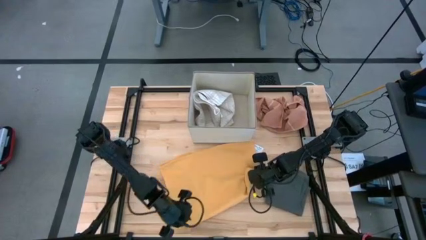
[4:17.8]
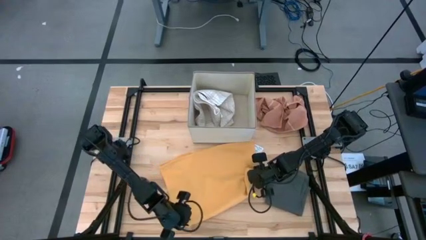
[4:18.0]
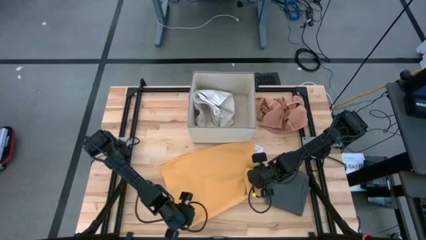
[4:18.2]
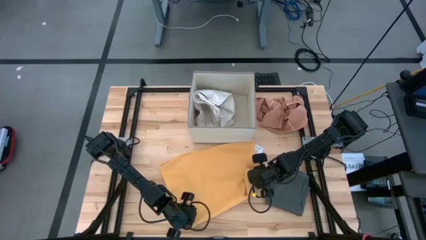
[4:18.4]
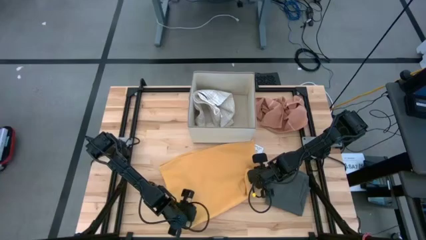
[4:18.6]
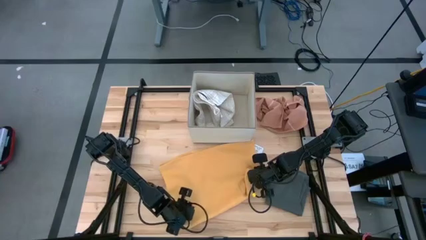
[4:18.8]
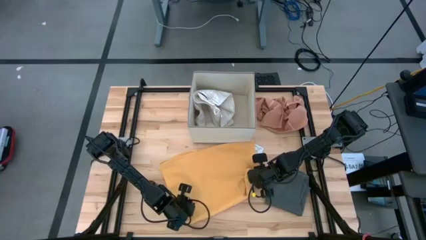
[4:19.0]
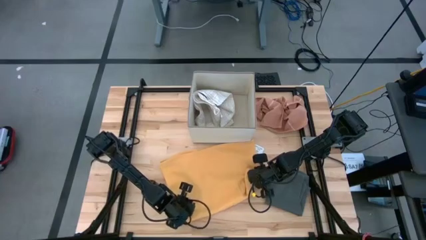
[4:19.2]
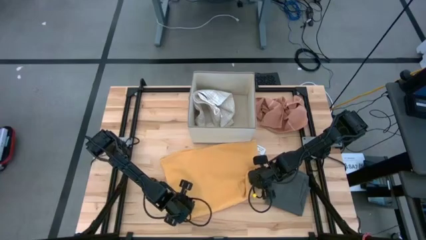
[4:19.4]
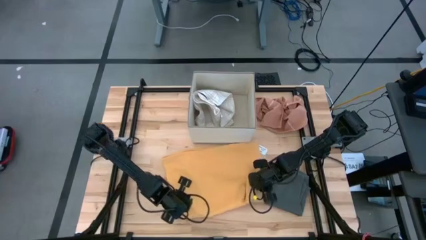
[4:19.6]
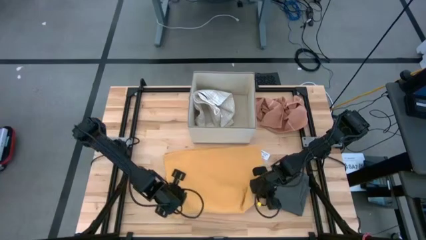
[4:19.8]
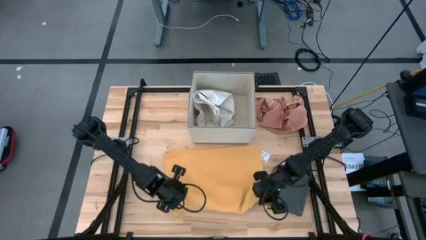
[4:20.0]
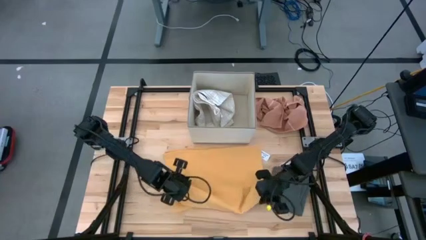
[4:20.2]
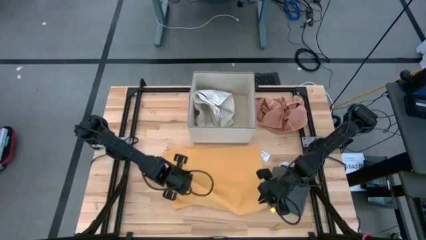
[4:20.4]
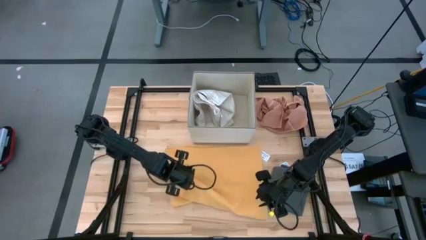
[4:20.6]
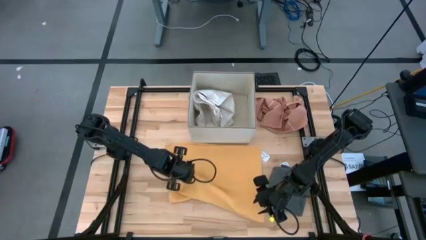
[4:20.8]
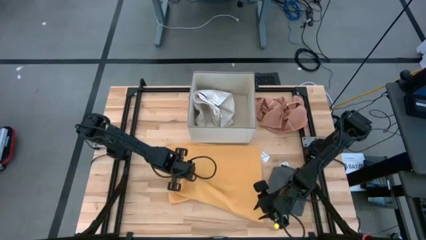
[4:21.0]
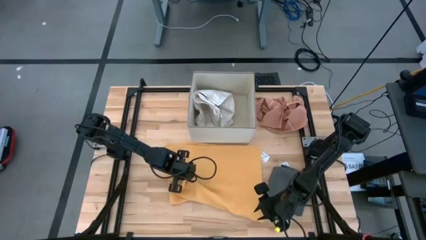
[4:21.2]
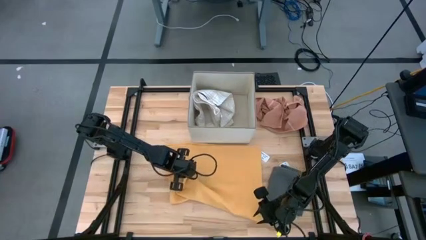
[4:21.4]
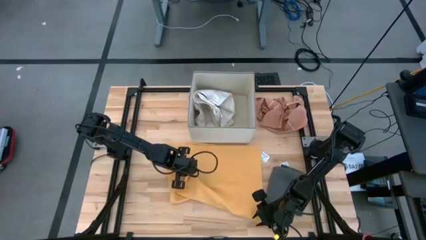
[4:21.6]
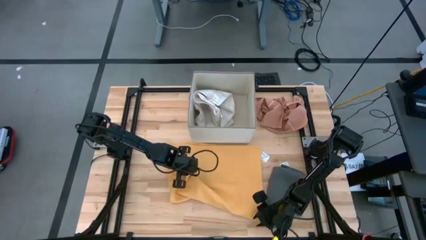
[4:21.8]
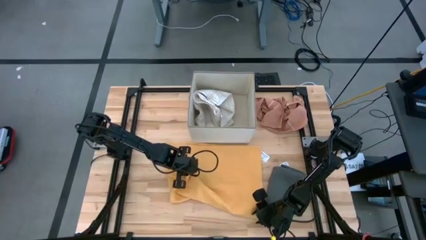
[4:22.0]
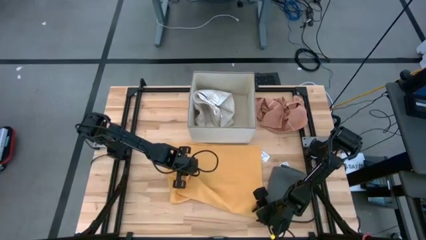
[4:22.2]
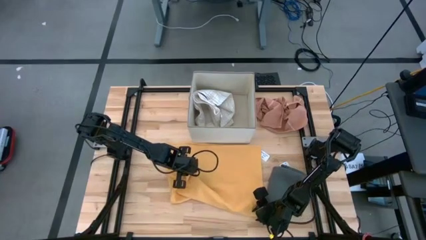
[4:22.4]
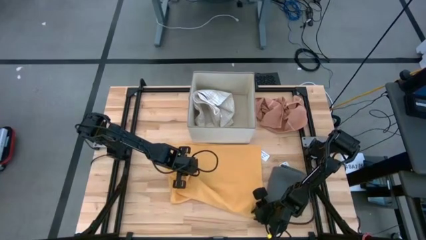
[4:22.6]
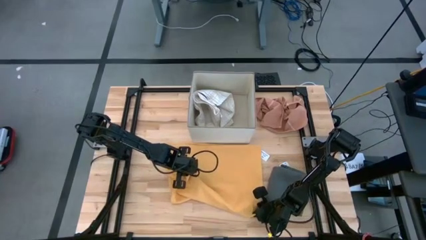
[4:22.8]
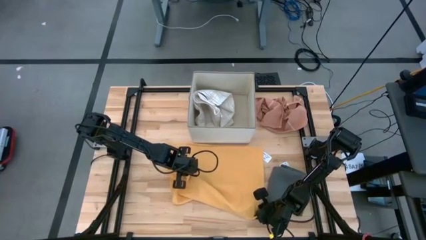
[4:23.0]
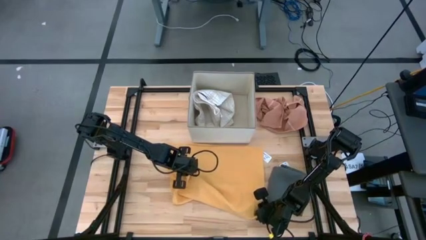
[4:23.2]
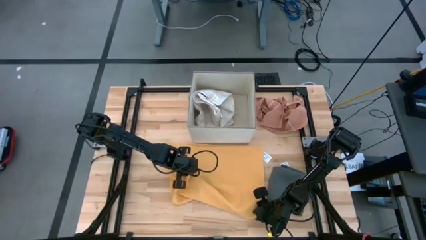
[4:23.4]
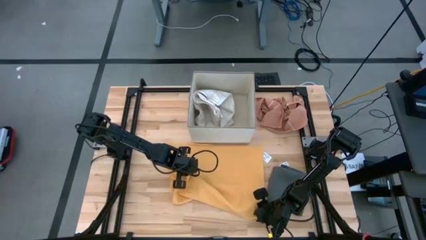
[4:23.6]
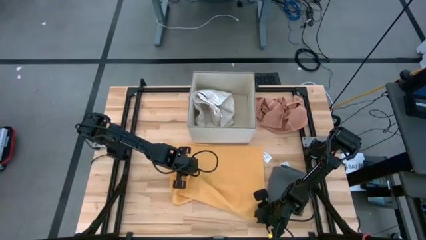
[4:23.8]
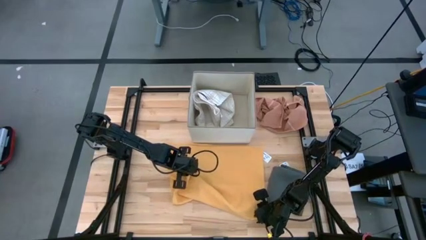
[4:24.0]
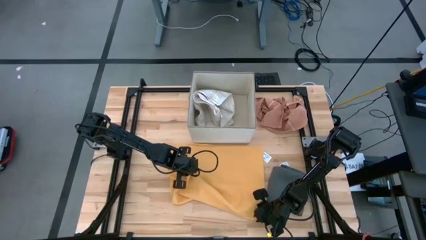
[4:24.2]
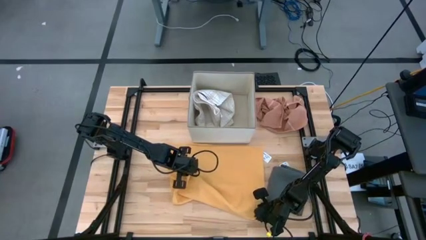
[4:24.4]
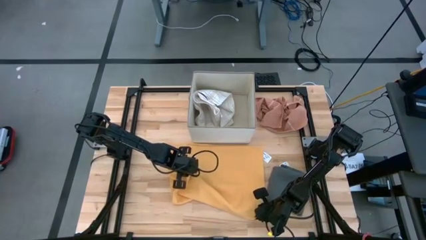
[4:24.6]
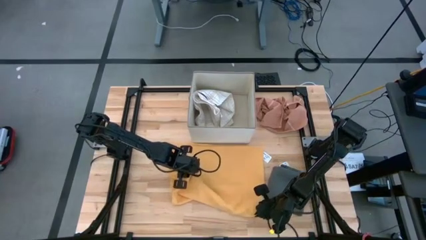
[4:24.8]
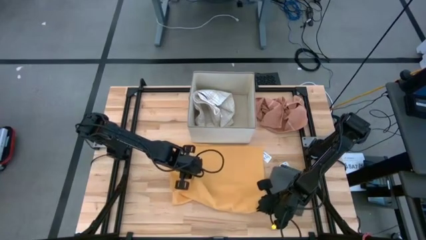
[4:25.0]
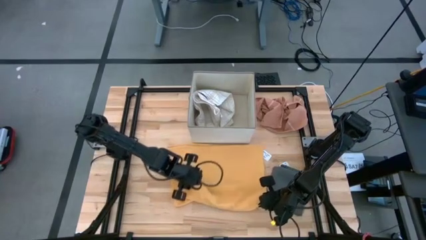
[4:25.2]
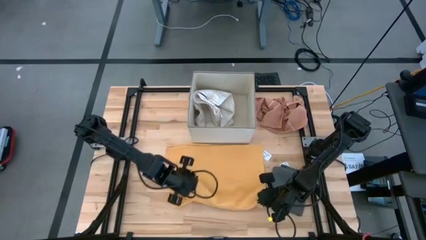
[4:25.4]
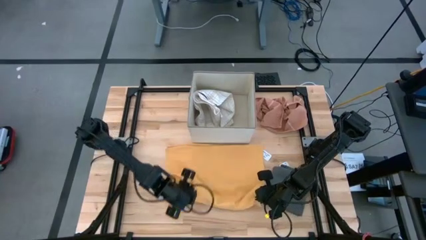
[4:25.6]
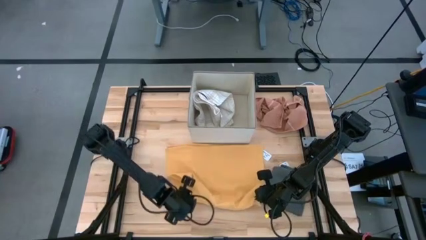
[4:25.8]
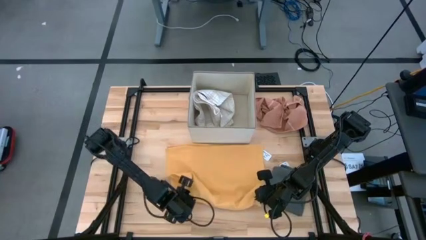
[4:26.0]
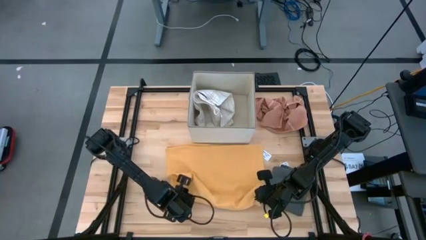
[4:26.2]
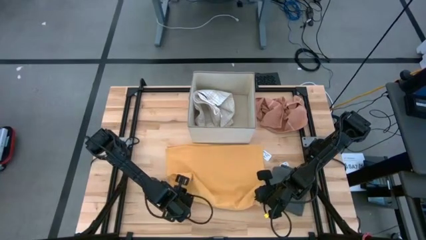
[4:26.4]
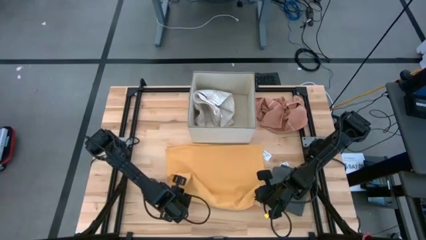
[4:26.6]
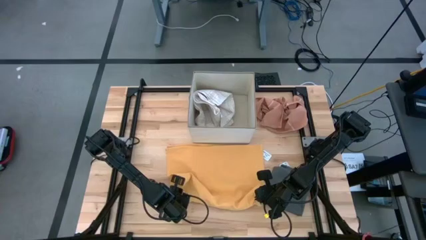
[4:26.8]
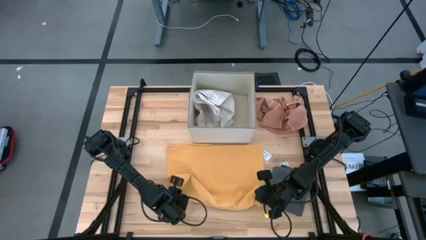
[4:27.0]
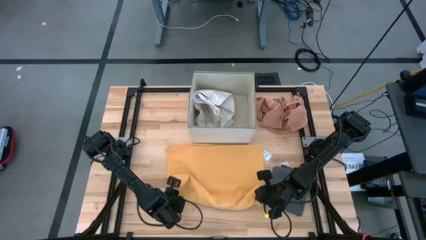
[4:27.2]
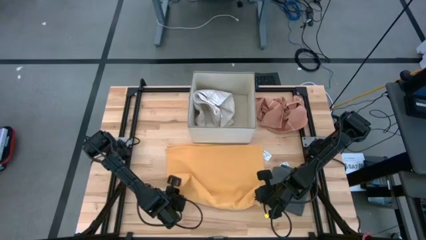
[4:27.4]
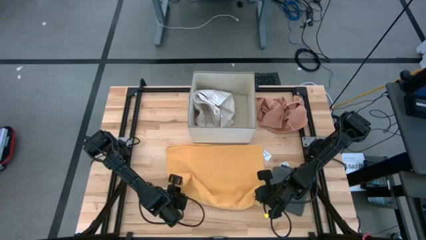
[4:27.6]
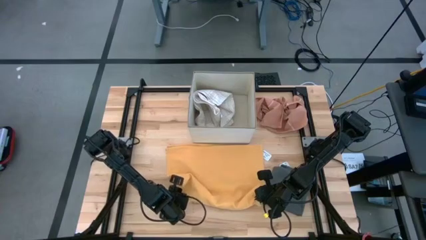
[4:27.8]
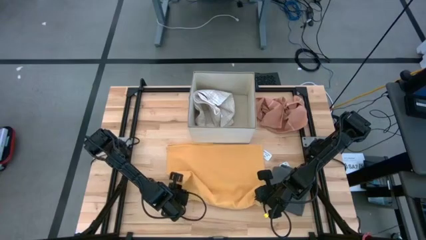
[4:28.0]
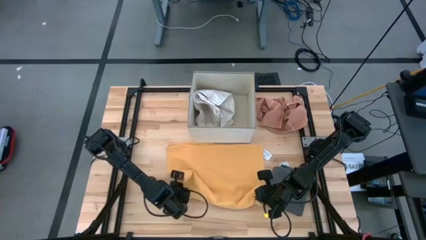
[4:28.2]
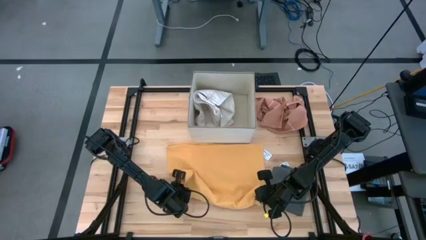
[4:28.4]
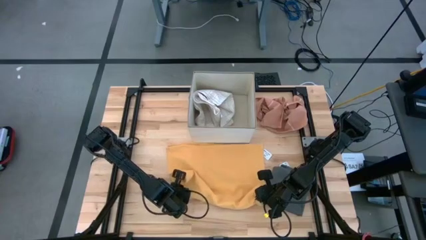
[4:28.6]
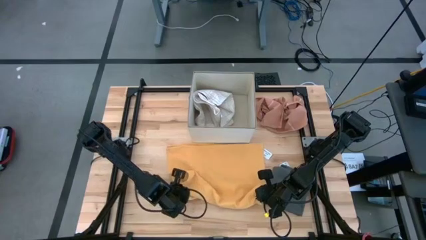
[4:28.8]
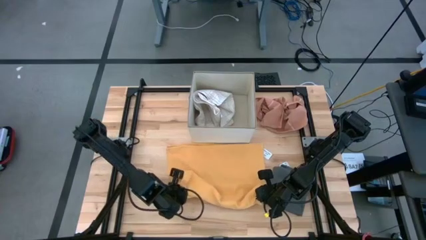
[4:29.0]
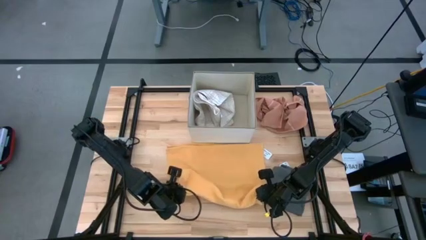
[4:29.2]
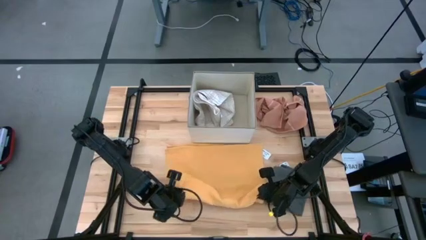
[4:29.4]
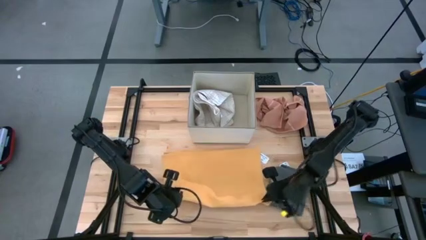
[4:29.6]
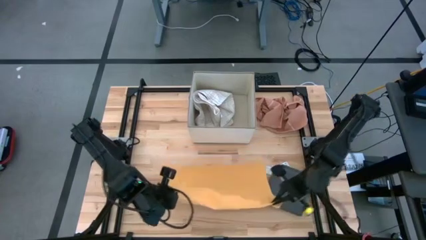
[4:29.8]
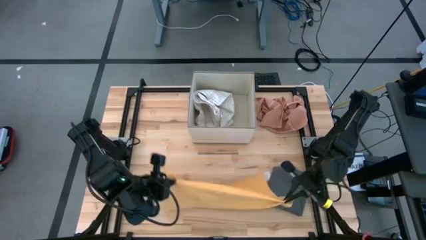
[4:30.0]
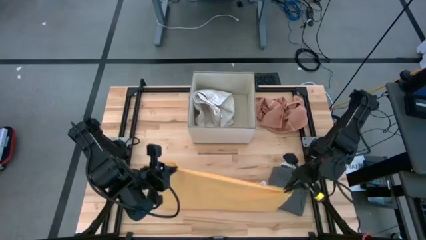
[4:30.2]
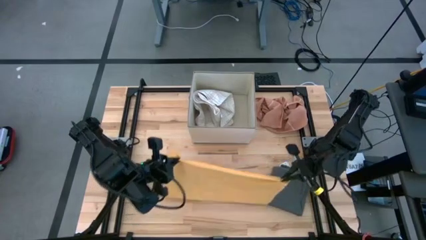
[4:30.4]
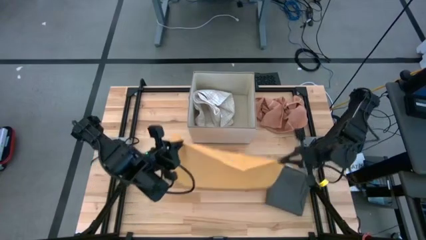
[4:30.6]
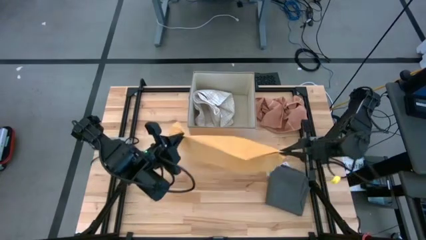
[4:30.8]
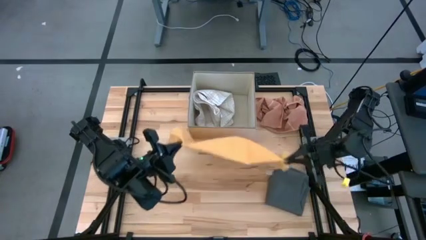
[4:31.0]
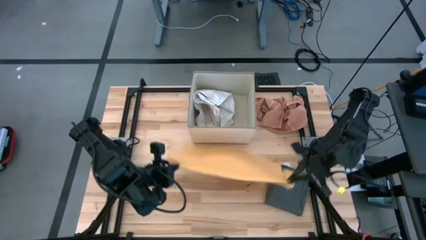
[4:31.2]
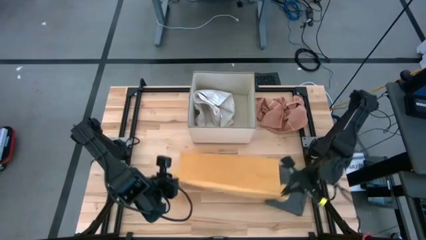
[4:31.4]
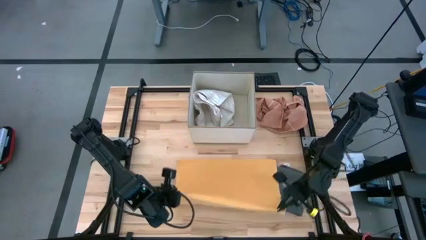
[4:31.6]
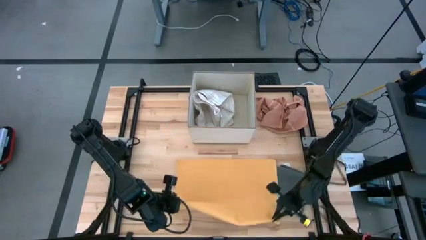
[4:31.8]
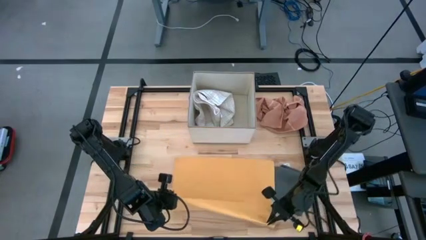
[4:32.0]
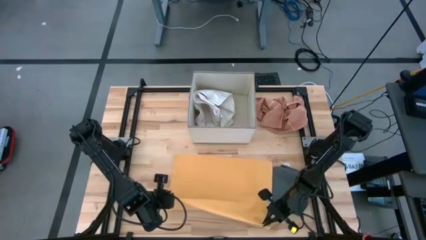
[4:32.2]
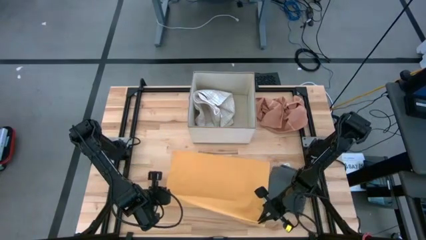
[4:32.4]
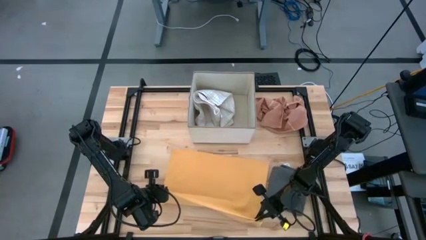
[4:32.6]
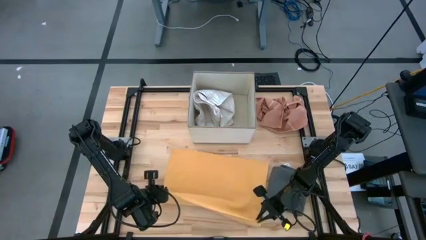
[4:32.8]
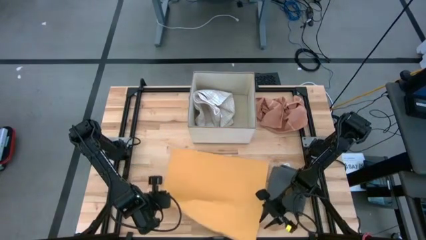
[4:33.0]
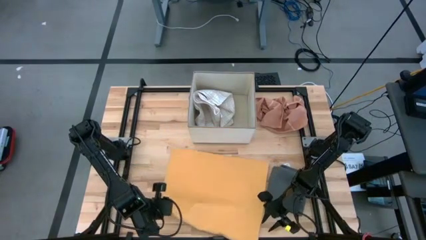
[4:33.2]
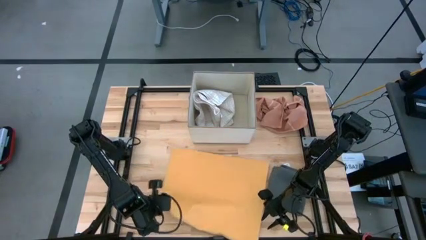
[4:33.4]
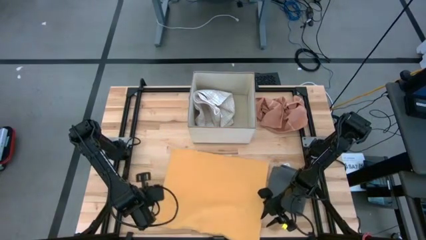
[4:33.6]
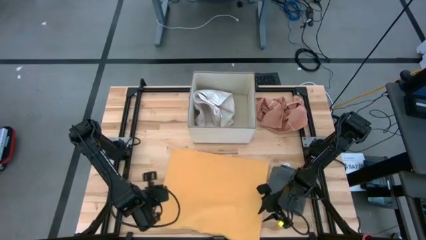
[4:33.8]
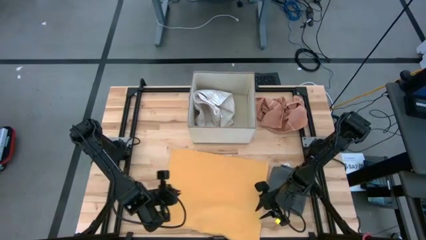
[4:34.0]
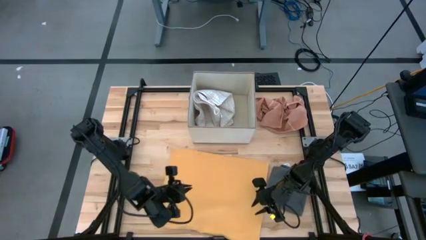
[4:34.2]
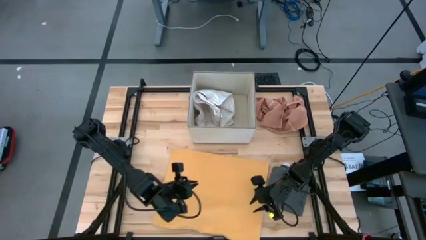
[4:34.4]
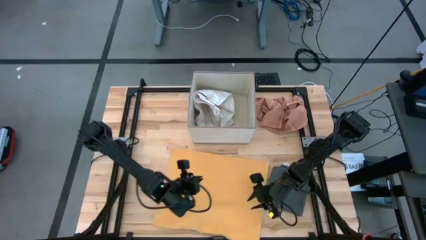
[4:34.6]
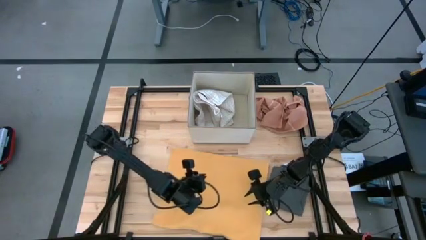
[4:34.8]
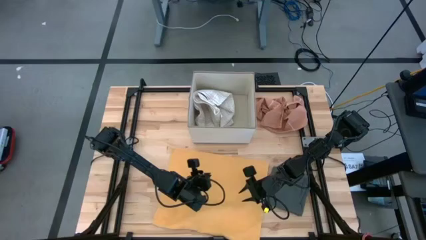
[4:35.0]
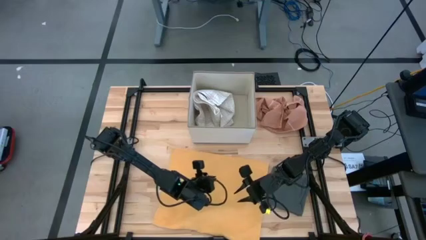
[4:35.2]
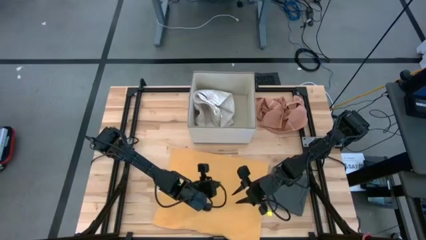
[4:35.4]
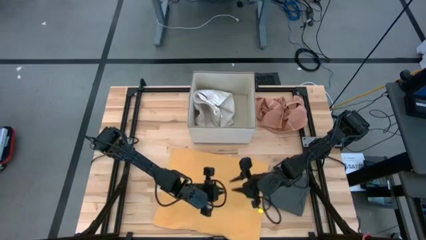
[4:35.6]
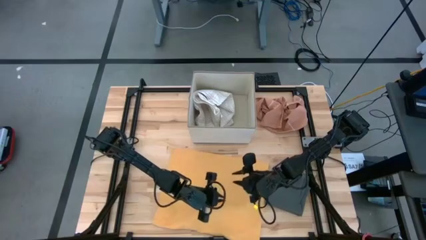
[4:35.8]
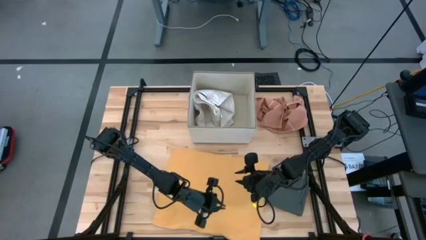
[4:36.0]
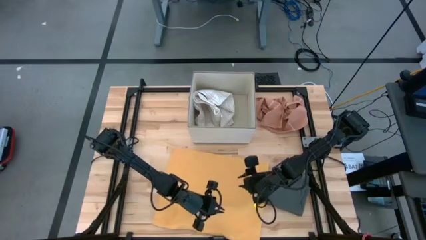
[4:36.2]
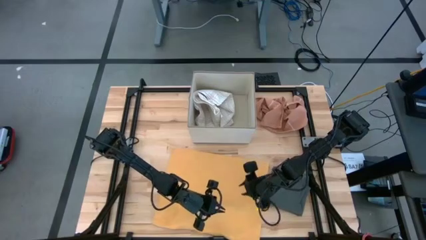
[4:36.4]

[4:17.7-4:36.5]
Task: Fold towel
Fold the yellow towel
